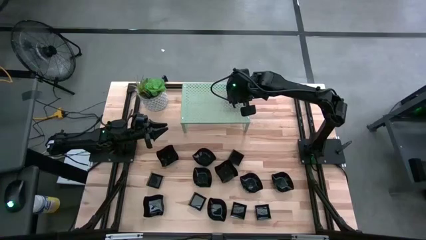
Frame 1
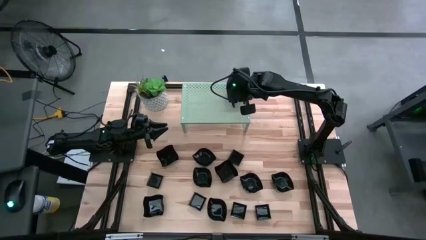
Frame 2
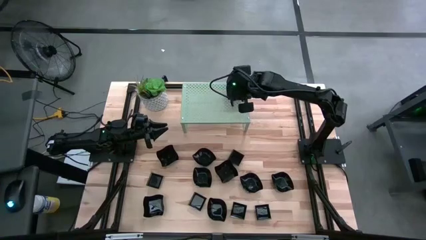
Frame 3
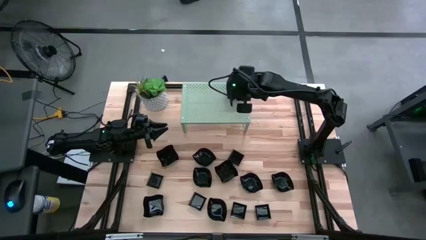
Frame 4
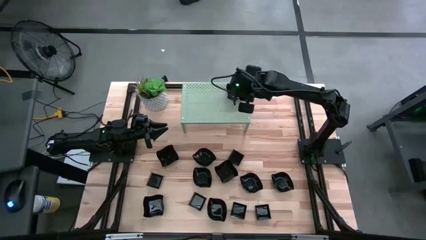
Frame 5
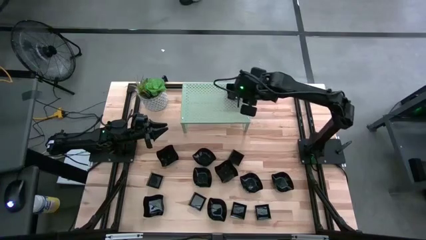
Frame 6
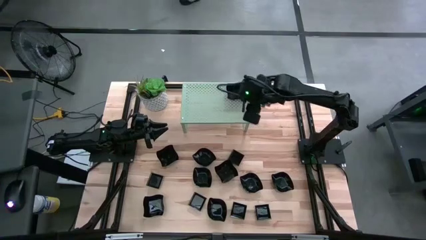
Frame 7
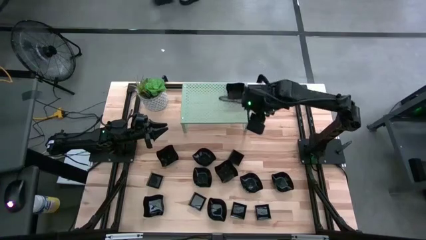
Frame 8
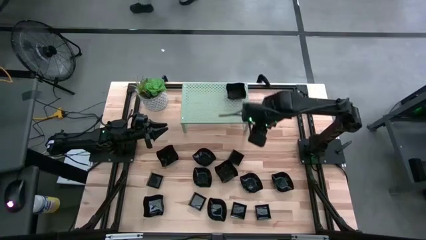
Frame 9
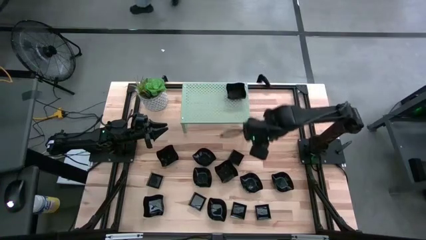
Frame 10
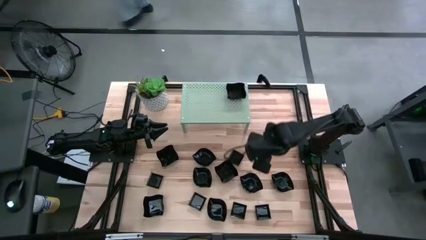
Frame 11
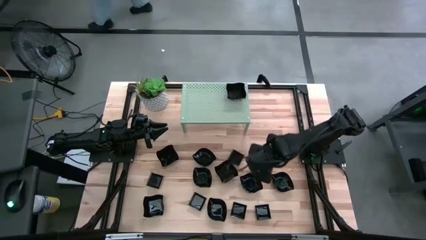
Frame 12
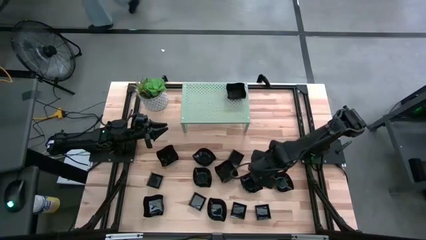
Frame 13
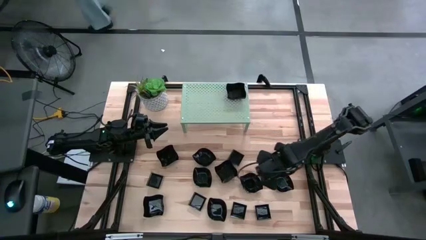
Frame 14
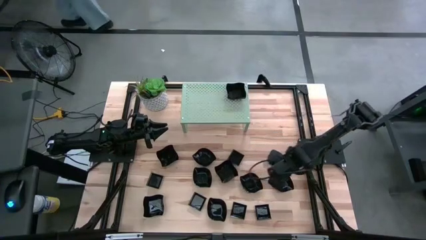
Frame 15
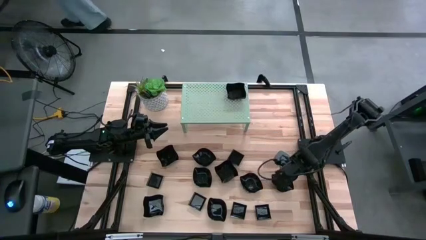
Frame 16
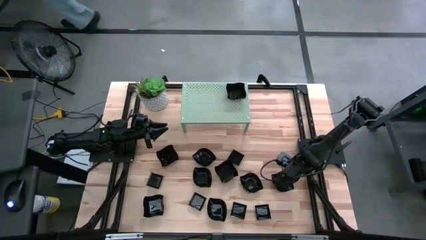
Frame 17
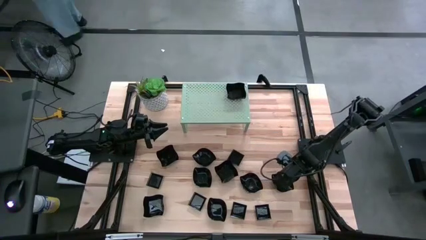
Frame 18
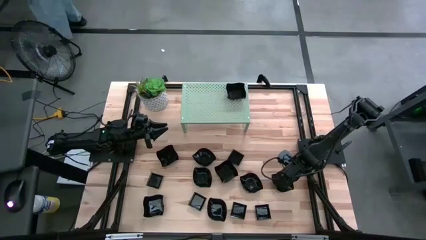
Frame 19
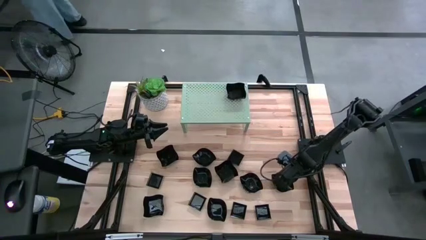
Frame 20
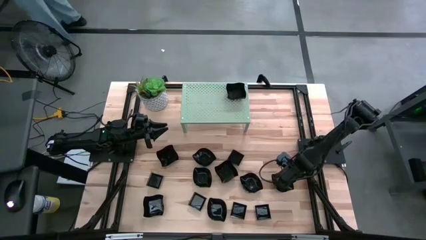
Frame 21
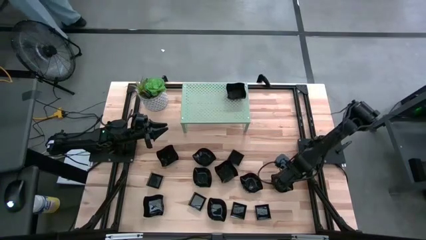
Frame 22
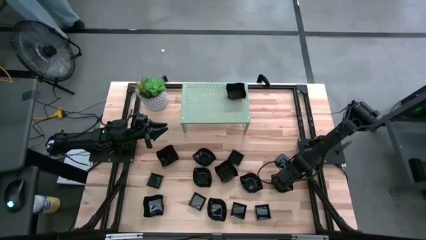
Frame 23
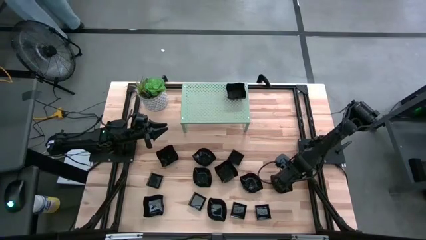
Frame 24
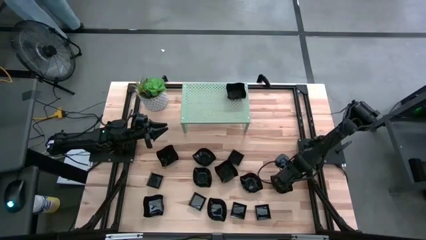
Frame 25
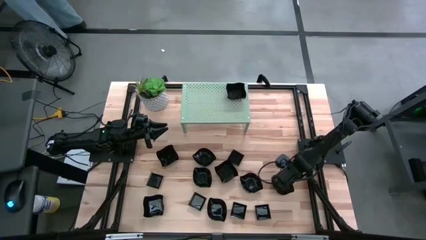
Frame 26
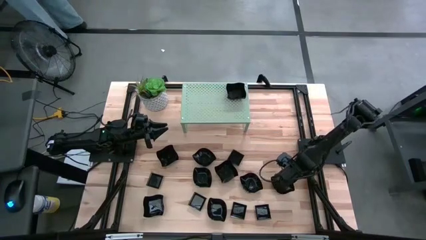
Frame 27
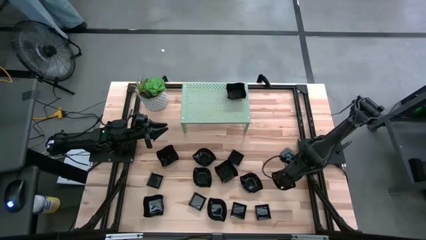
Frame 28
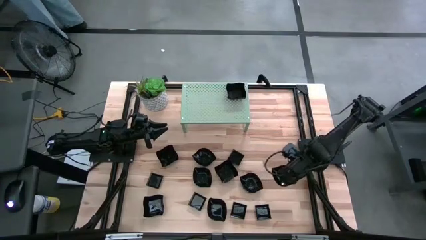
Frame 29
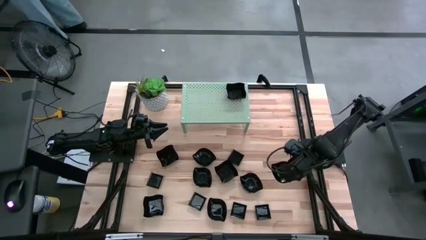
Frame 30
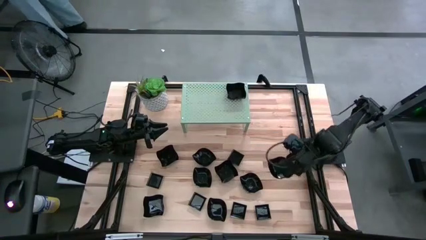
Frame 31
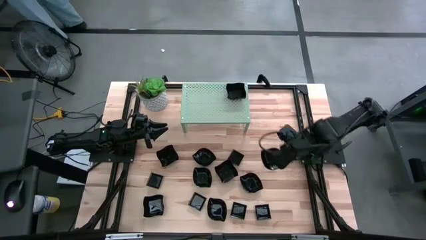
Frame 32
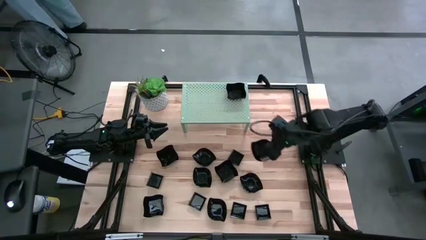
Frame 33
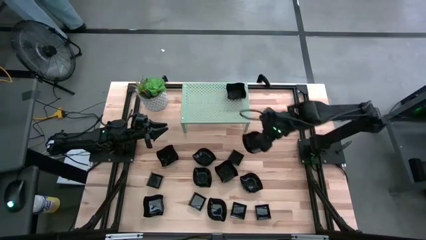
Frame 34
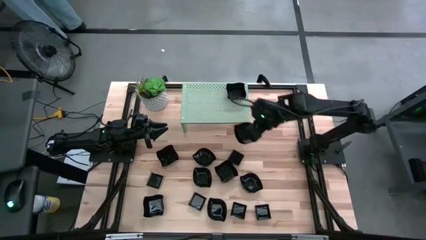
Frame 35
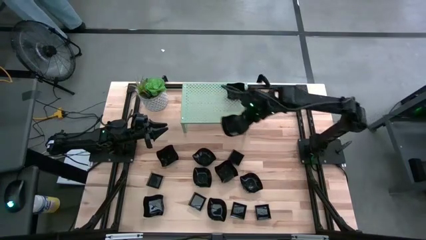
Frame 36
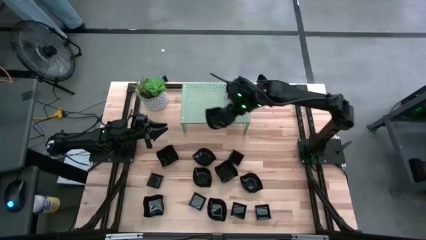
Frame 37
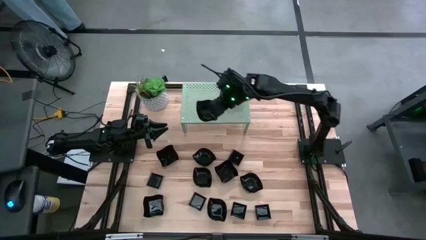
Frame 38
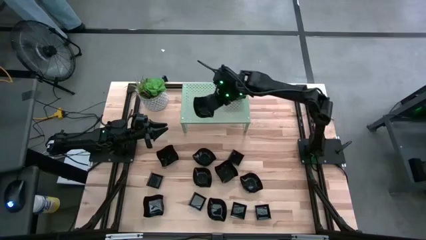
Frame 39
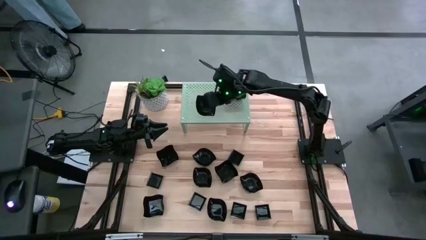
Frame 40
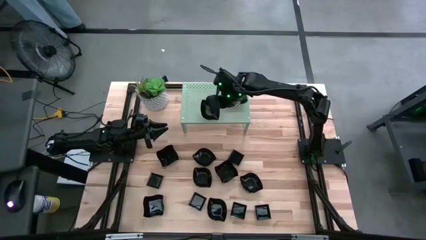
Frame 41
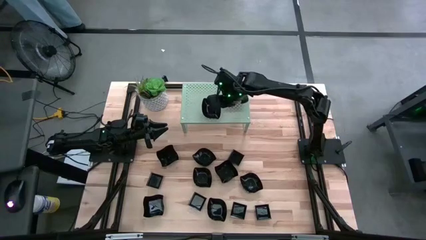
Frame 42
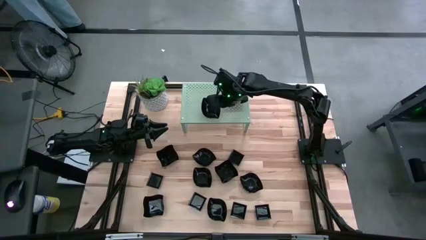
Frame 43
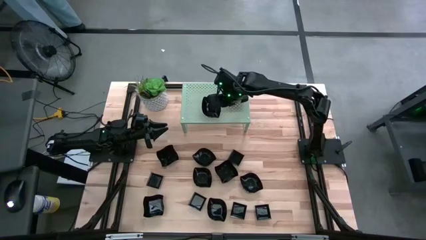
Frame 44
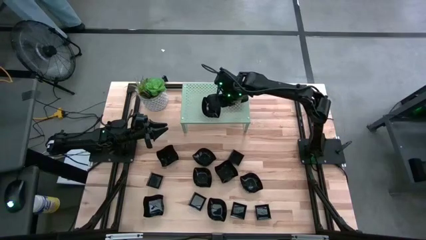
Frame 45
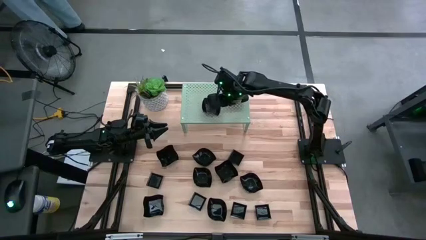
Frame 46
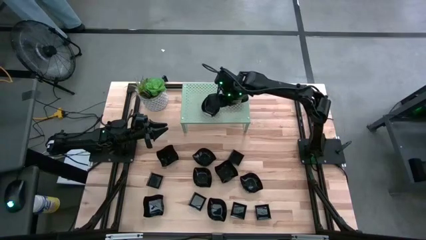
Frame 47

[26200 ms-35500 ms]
Task: Pick & Place Mini shaped plates
Put the leaf shaped plate on the shelf

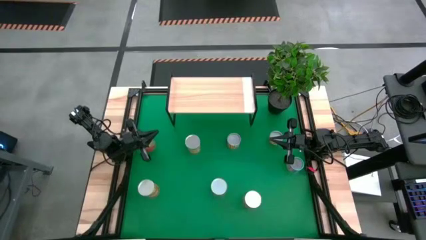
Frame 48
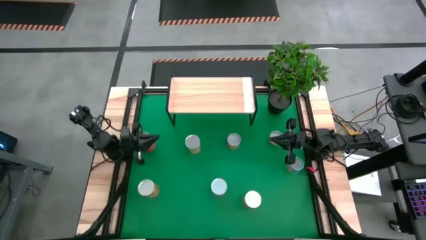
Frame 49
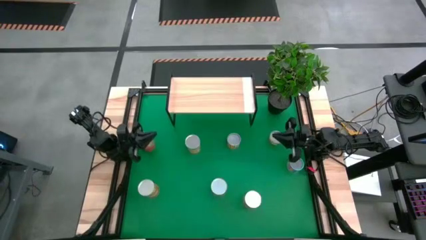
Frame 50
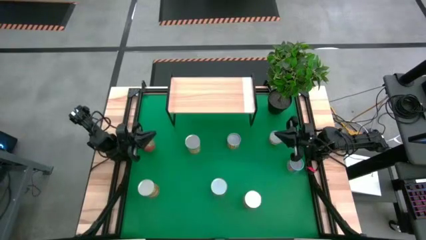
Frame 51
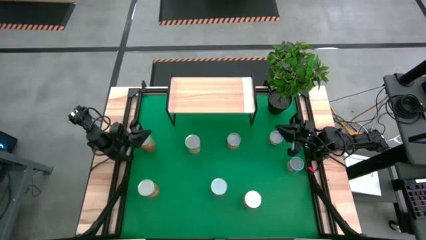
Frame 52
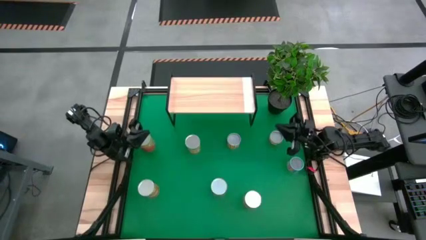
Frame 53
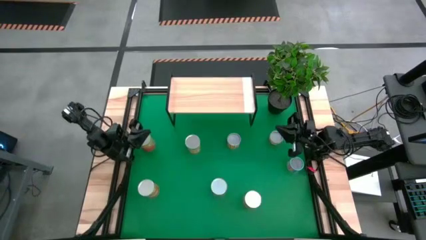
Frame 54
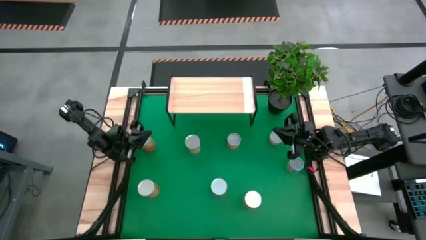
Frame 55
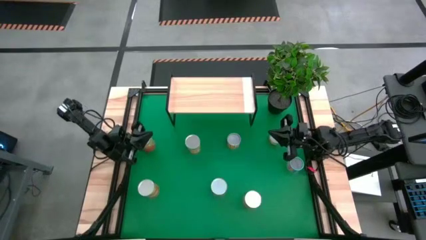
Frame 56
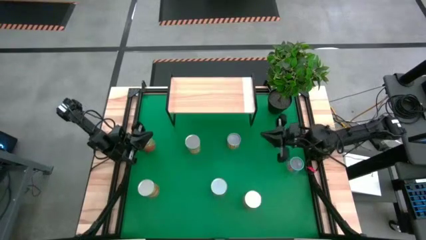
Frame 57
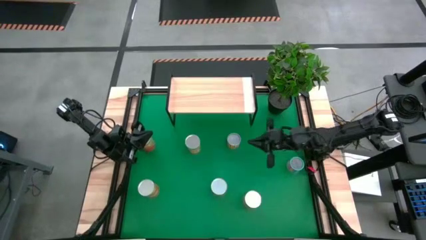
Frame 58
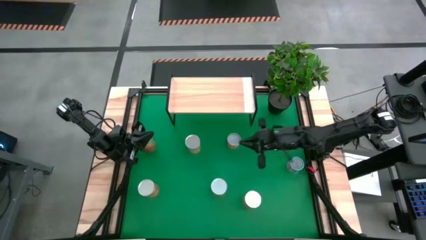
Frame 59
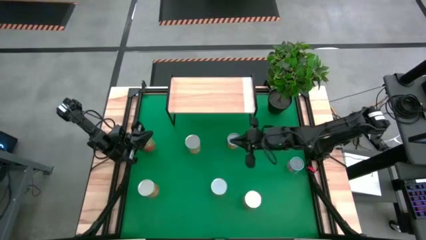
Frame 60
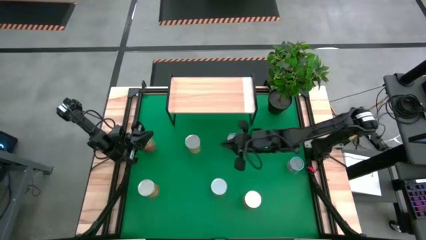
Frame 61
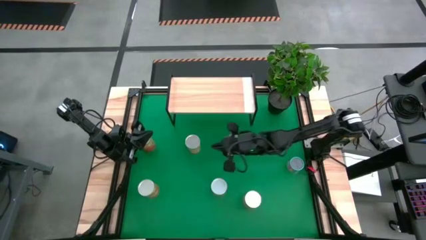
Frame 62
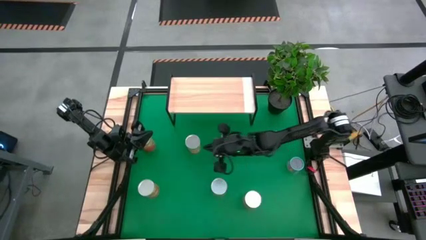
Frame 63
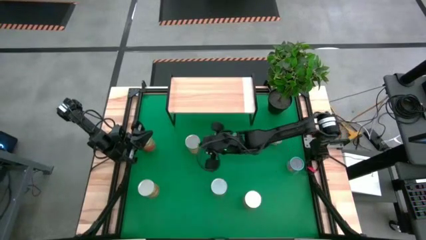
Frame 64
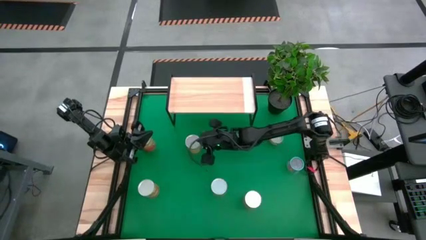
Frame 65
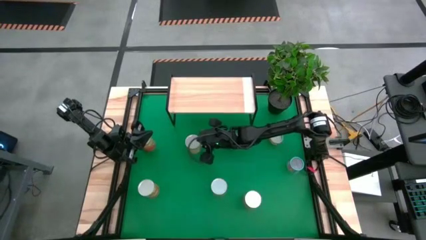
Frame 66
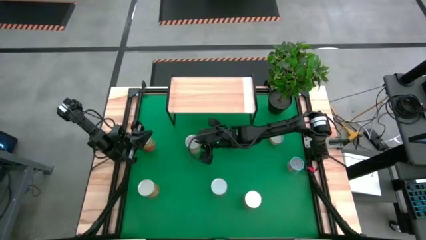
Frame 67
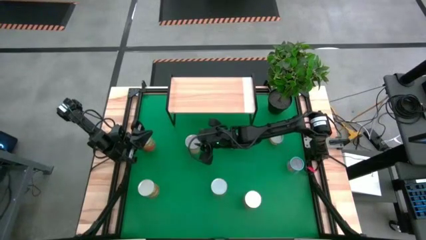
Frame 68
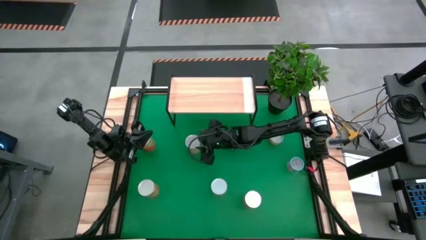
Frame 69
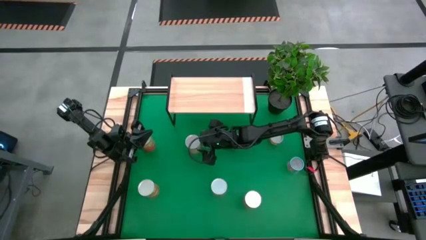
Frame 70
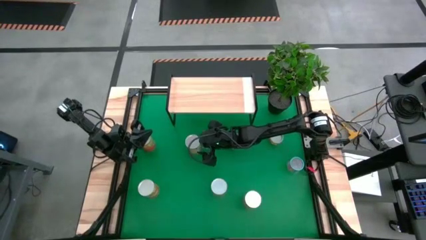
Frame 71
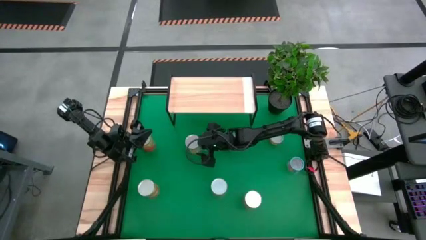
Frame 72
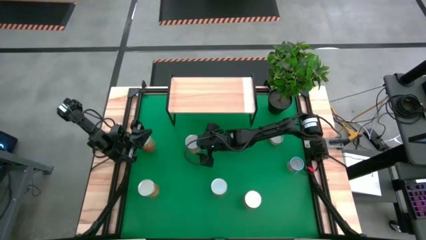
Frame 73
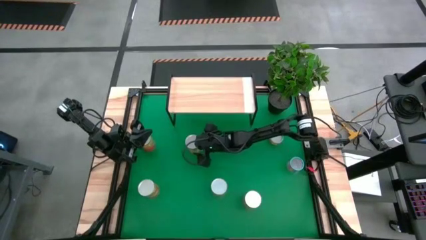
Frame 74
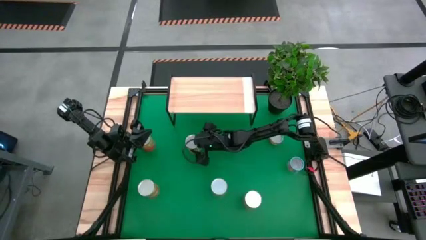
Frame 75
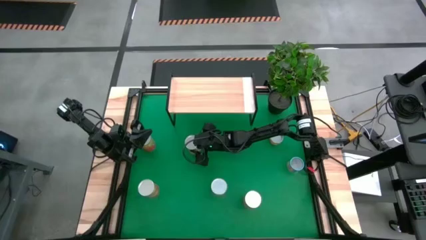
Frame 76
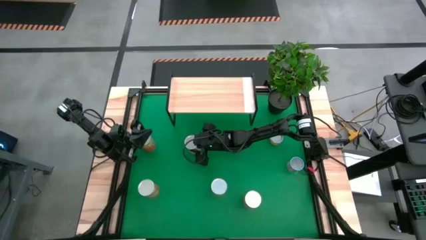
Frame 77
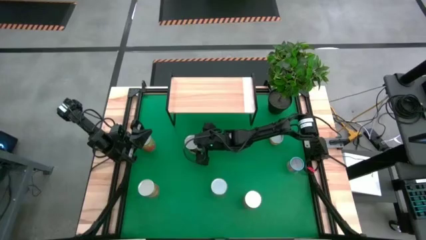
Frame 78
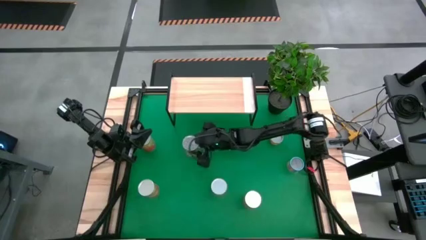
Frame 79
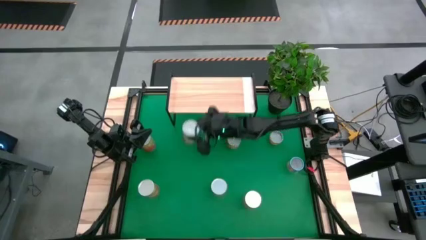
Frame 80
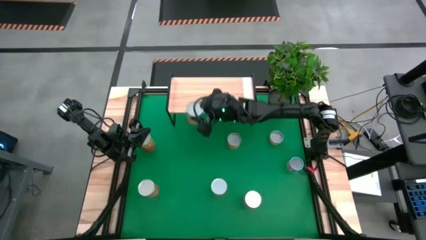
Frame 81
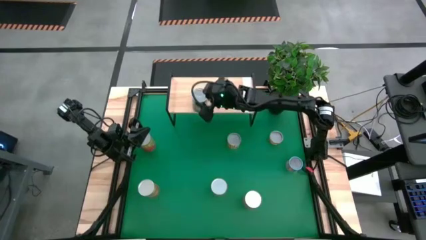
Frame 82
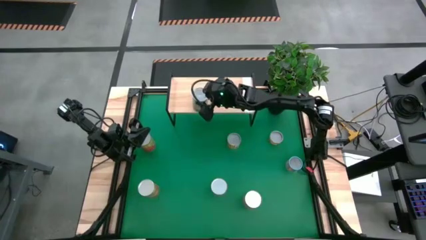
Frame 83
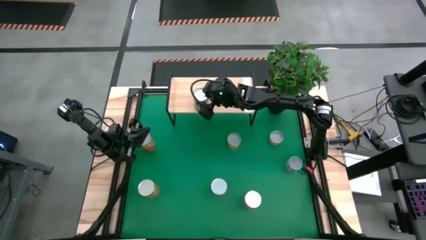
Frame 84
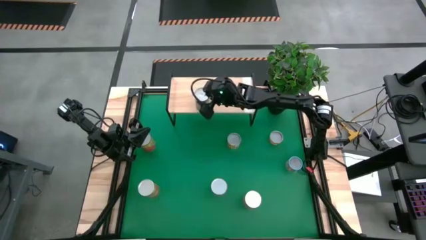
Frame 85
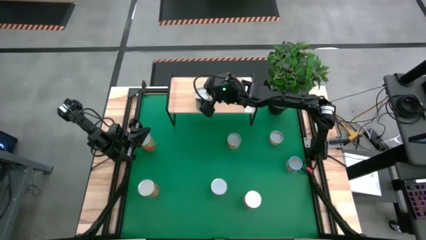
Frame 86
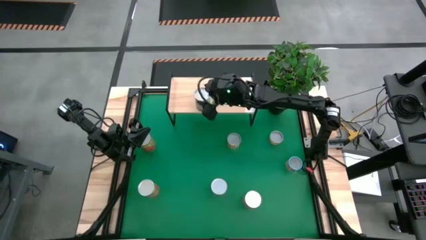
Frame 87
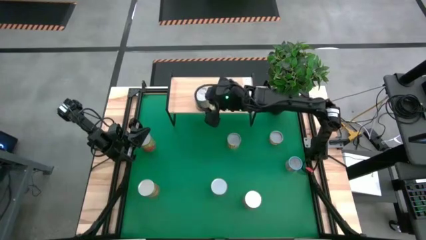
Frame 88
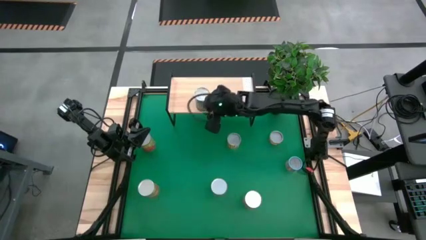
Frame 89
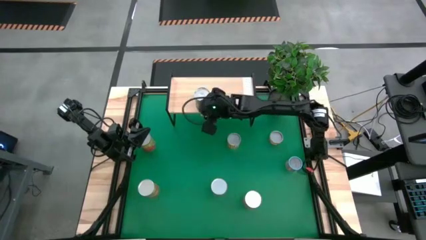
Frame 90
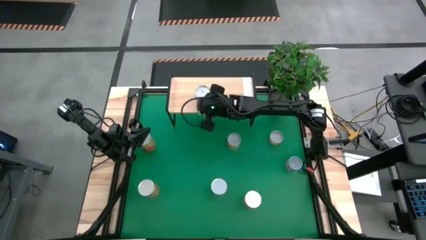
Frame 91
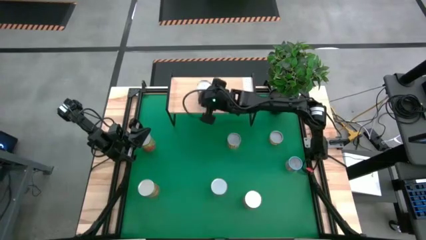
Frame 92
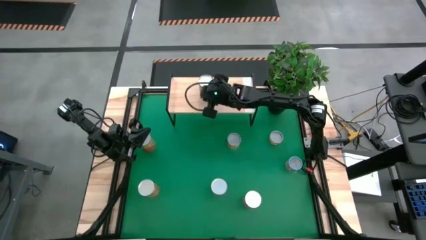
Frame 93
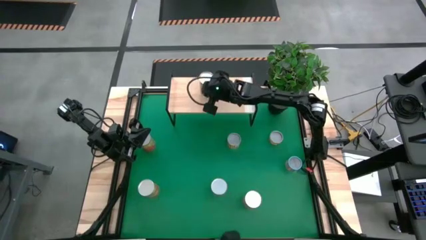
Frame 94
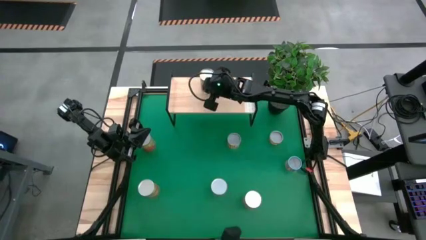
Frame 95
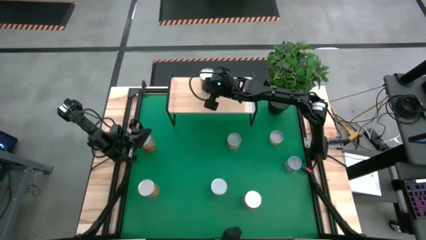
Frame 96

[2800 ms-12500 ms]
Task: Pick and place cans onto a shelf
Put the canned oranges on the shelf
